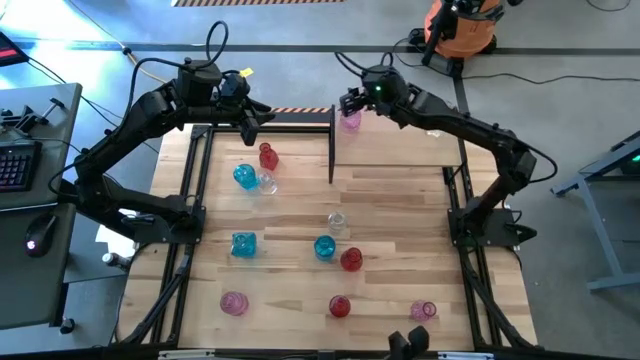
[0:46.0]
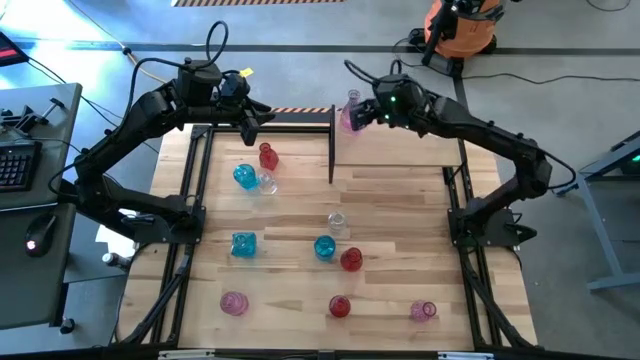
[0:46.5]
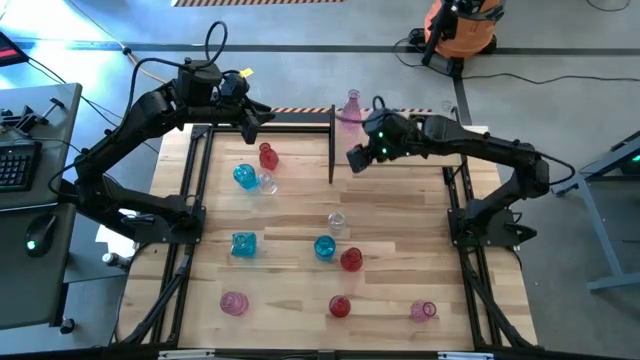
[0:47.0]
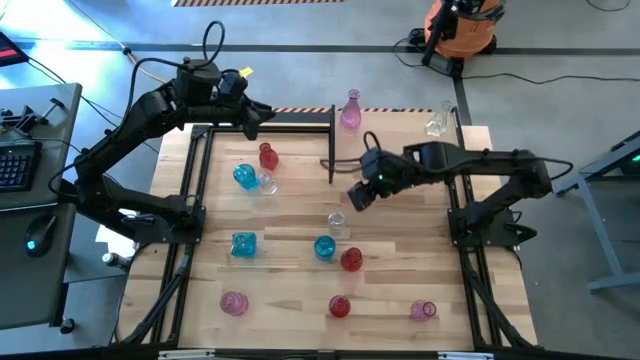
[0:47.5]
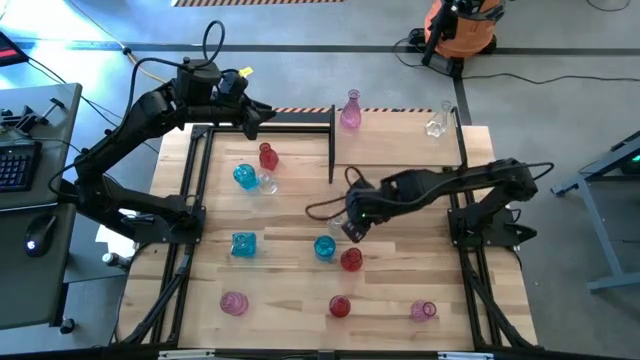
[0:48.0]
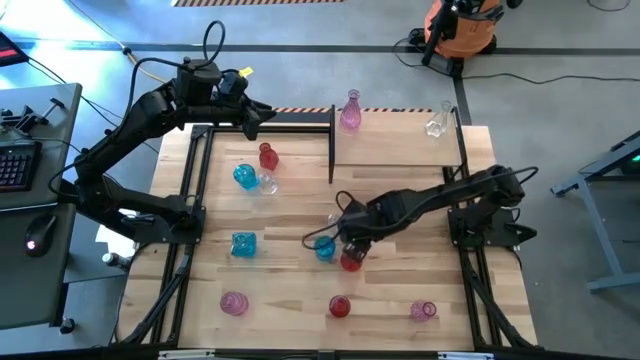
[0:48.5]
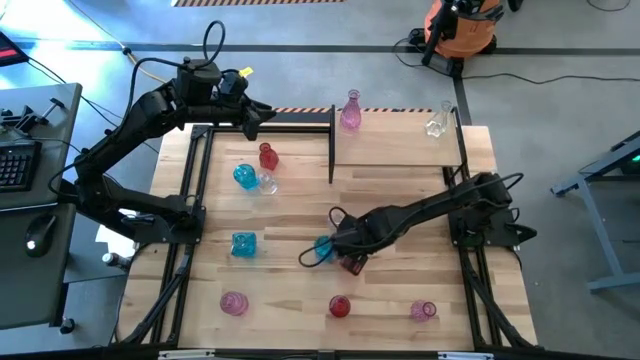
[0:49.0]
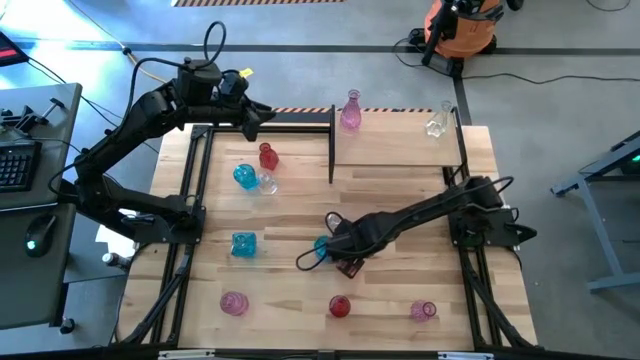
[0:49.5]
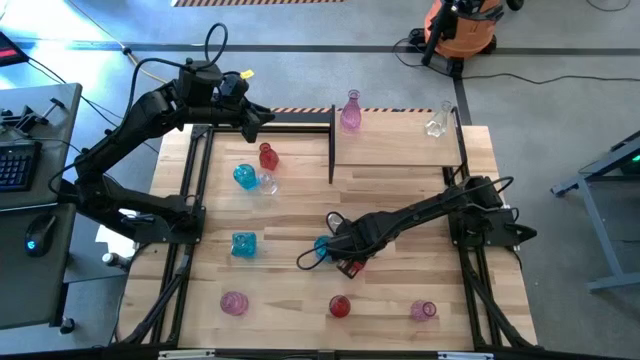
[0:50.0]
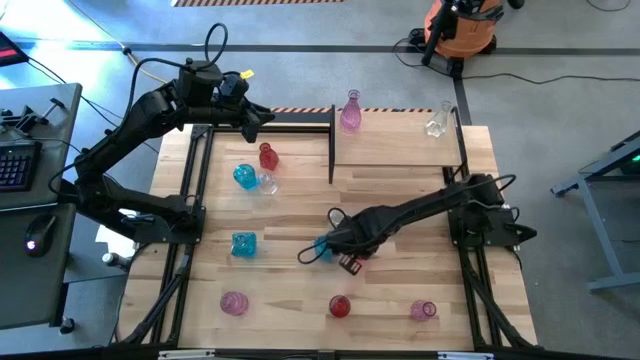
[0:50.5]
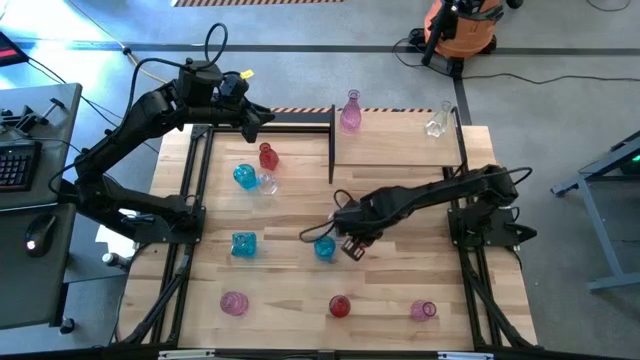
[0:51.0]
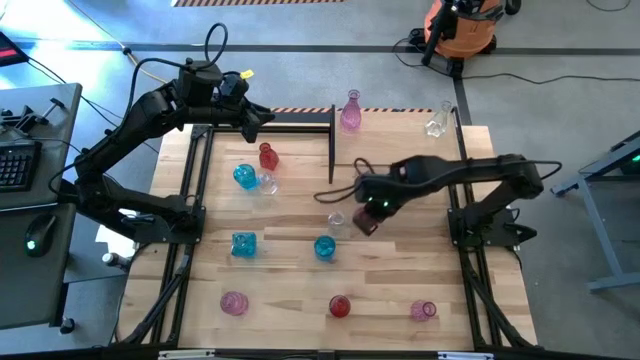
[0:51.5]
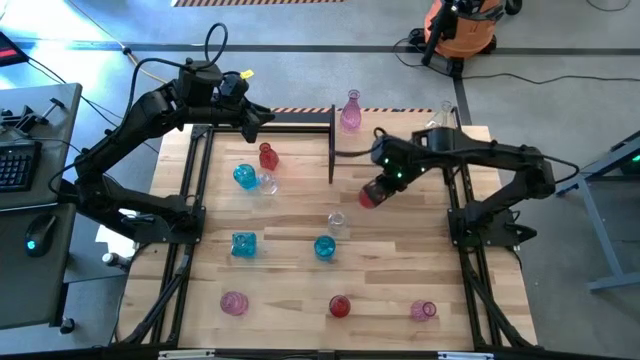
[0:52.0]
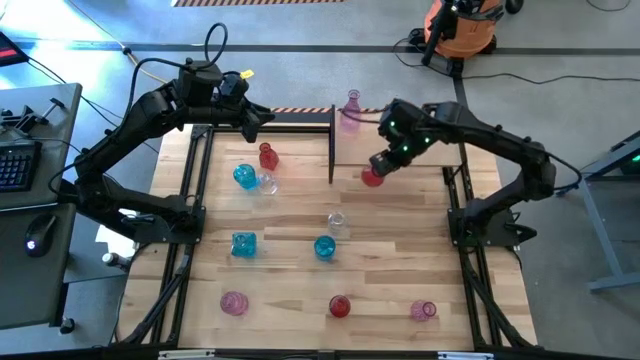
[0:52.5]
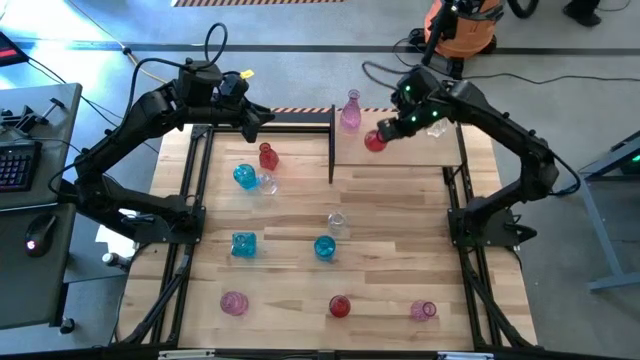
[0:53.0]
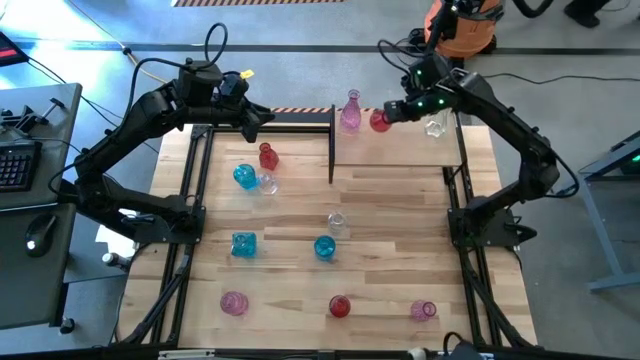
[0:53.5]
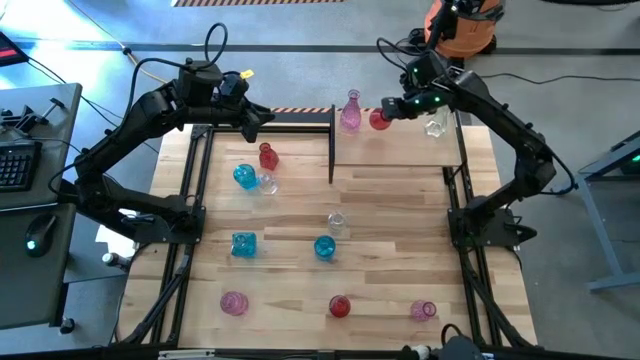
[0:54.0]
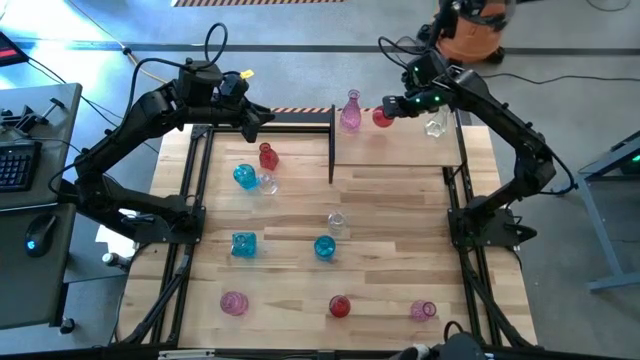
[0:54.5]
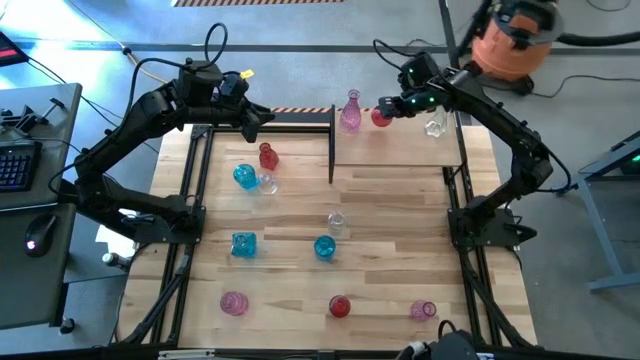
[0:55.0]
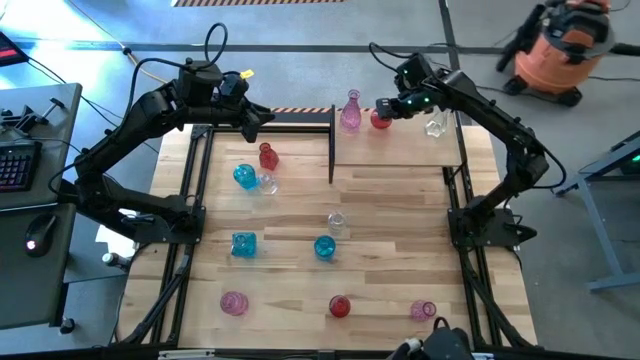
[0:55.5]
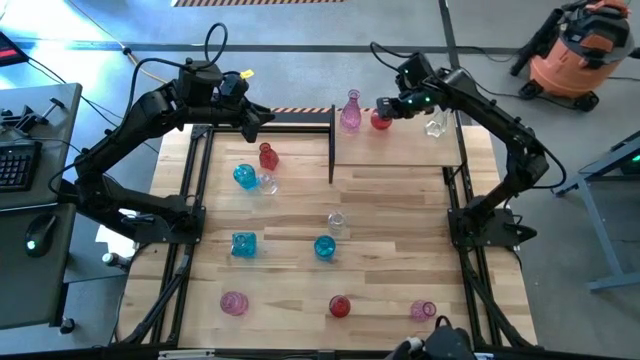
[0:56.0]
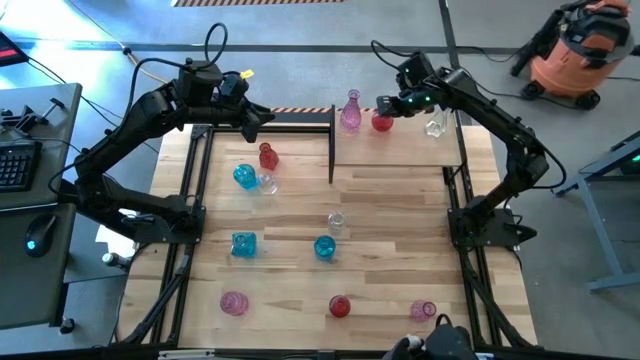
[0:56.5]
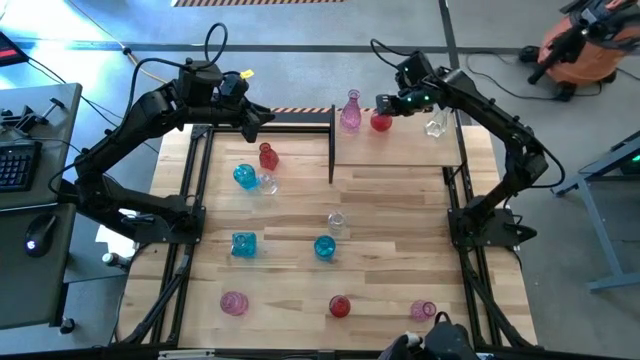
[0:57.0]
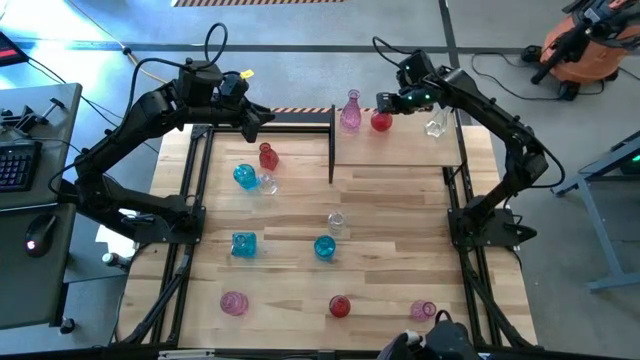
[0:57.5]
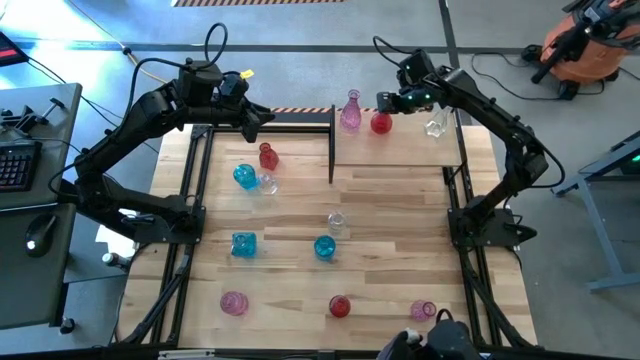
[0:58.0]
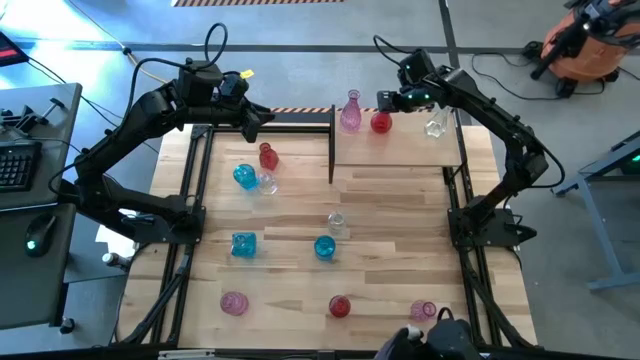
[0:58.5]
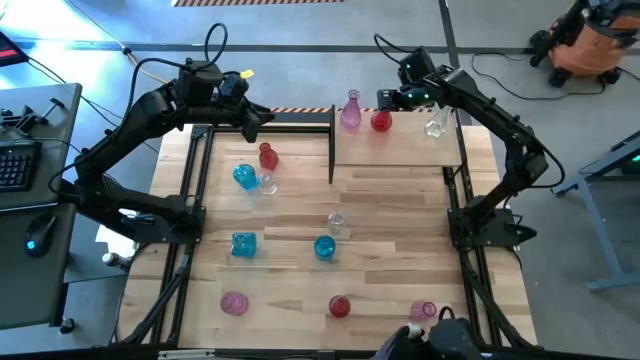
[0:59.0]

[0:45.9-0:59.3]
Task: sort vases onto shelf
Put the middle red vase on the shelf

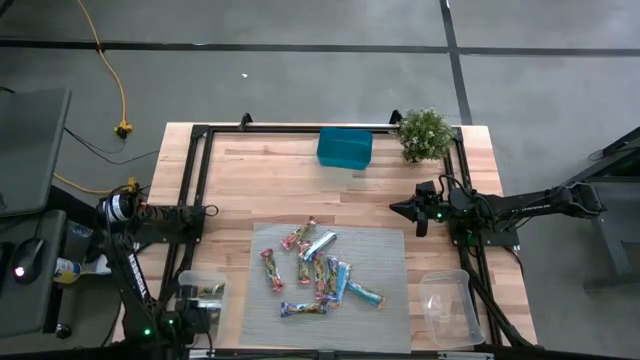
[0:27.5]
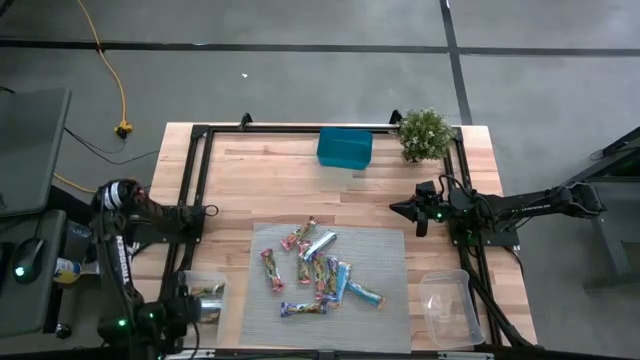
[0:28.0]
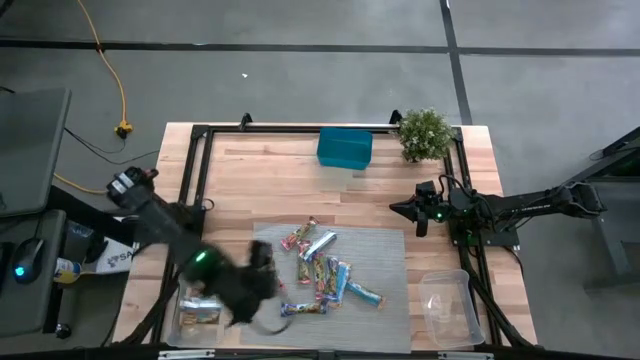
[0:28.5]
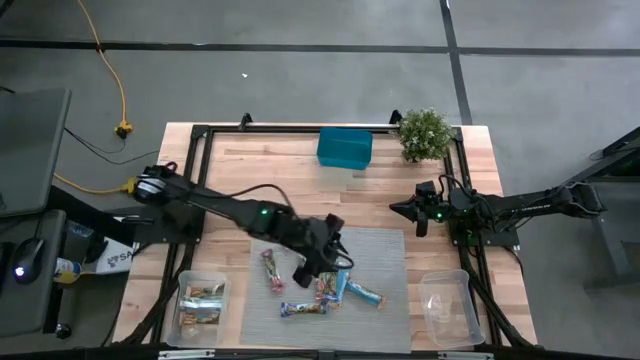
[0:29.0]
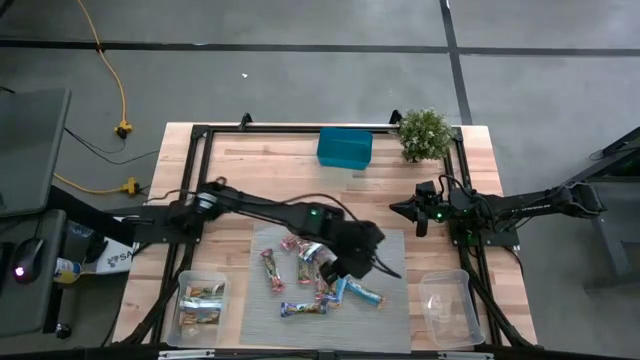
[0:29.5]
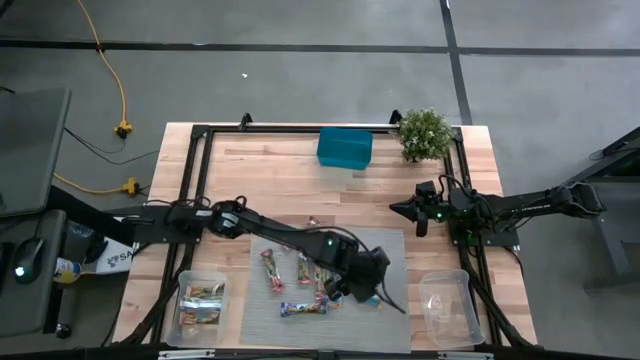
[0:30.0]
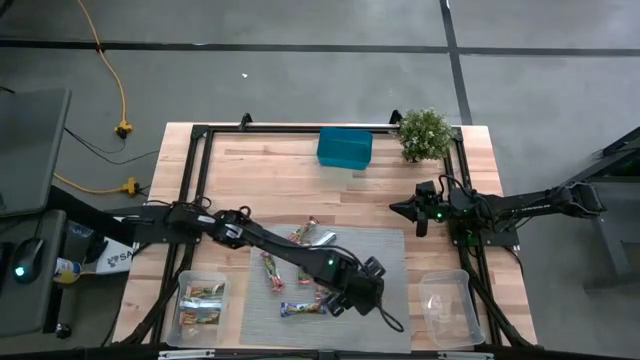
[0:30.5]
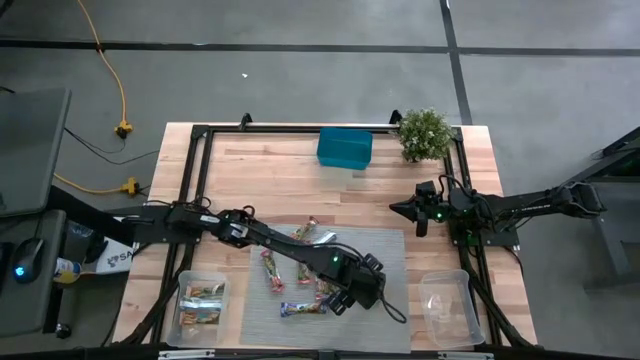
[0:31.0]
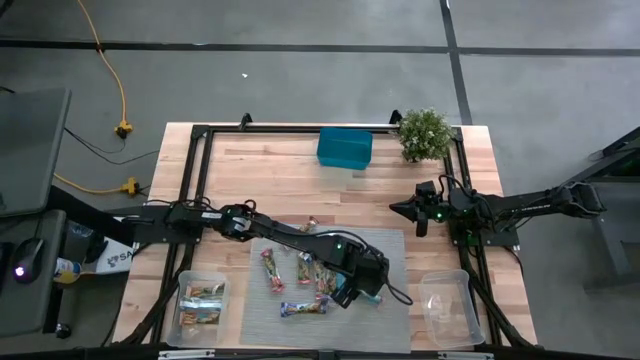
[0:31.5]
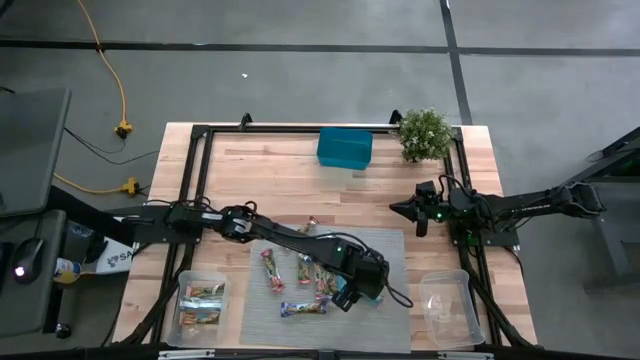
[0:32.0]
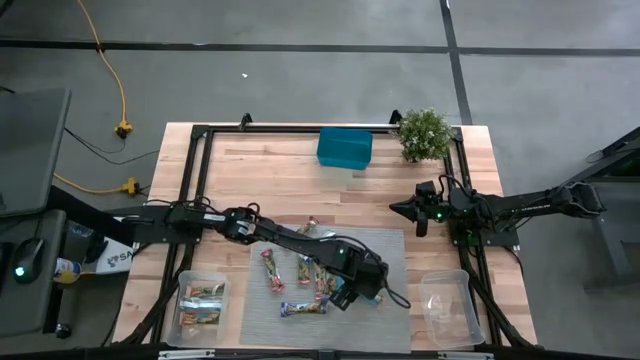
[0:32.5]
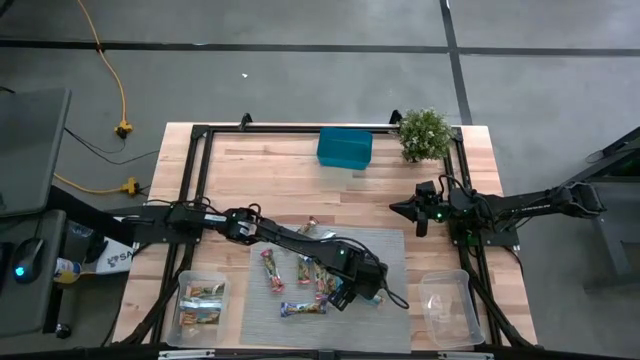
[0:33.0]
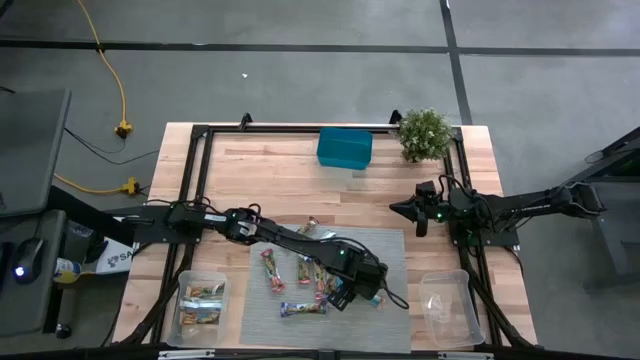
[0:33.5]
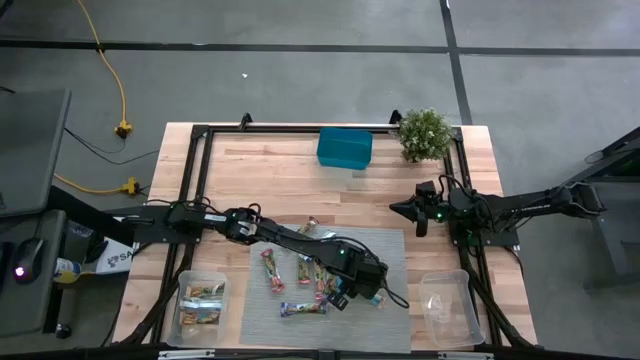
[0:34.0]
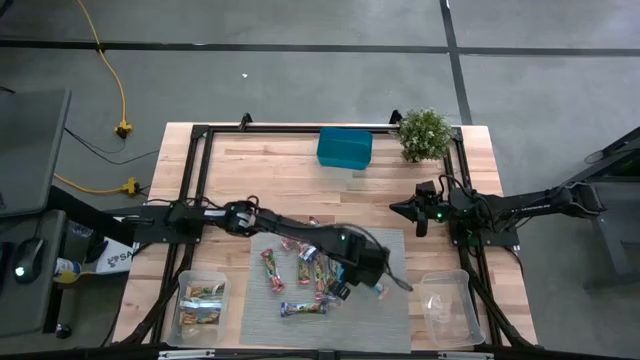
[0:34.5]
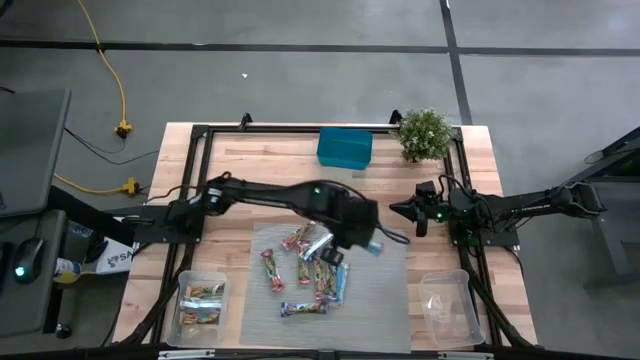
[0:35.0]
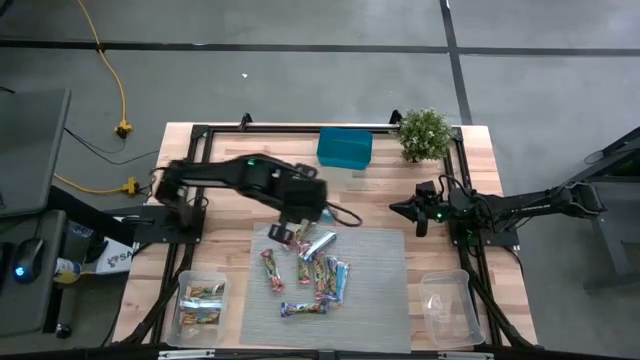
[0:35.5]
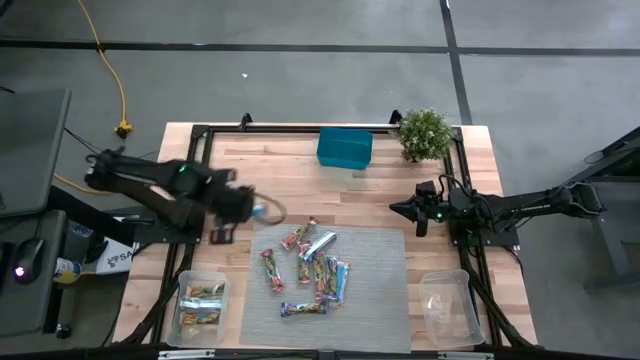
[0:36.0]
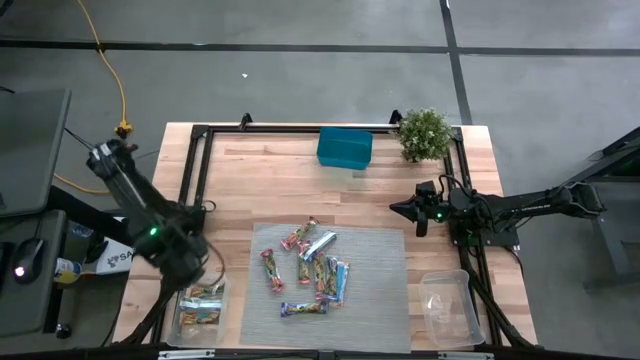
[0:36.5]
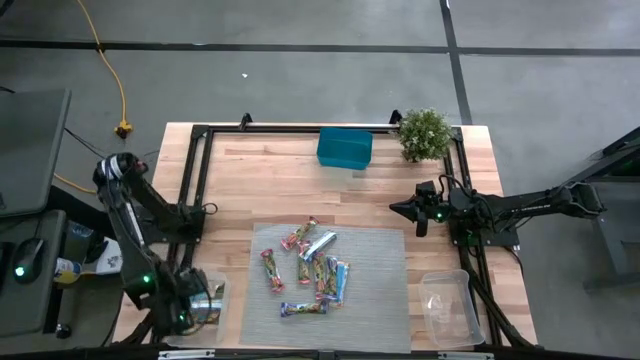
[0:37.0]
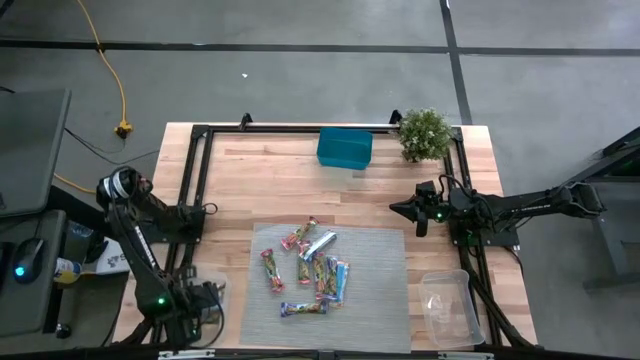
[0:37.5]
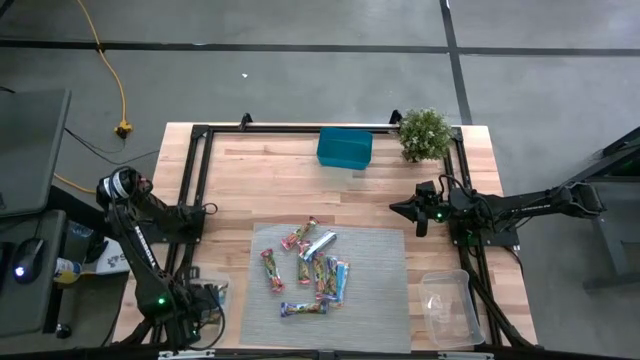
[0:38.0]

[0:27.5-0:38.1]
Task: Pick and place Granola Bars by type
Put the yellow granola bar into the left transparent bin
